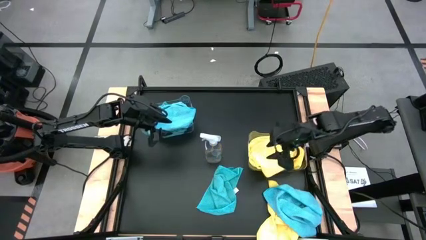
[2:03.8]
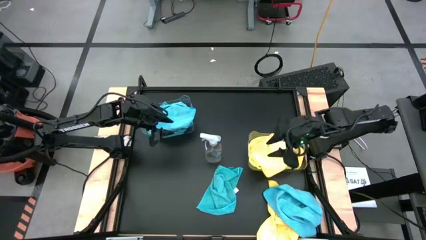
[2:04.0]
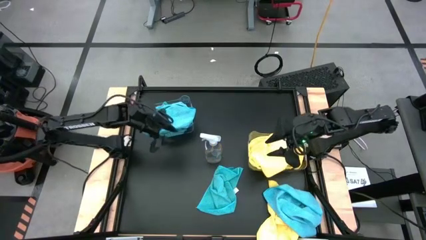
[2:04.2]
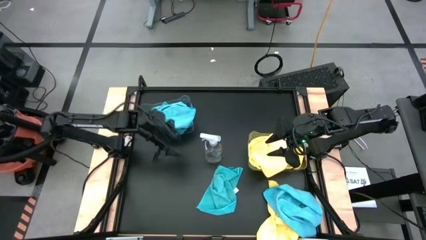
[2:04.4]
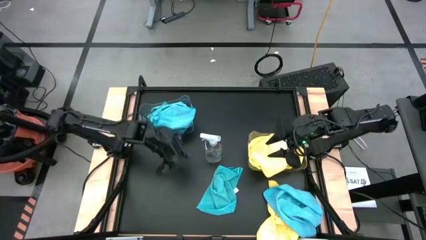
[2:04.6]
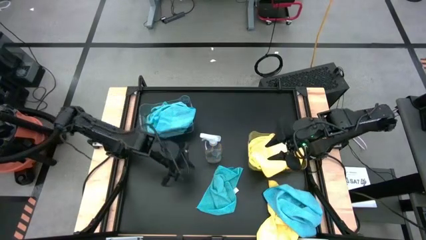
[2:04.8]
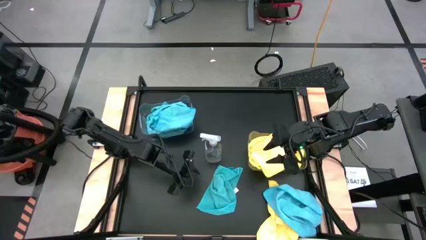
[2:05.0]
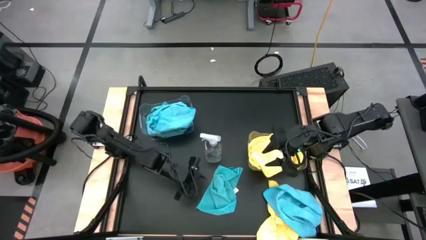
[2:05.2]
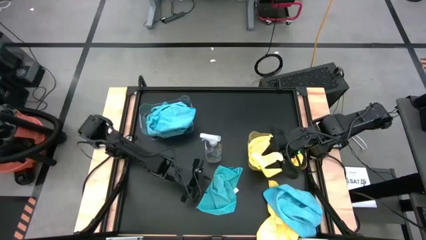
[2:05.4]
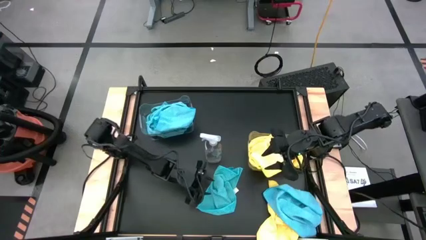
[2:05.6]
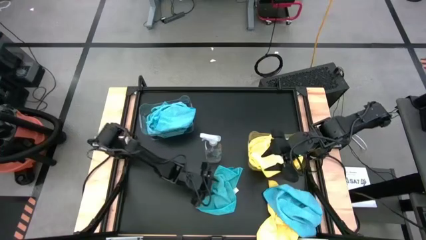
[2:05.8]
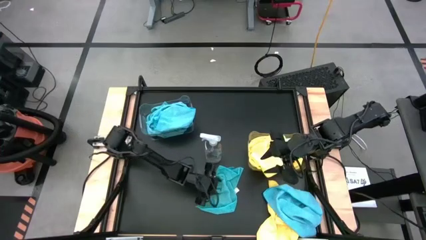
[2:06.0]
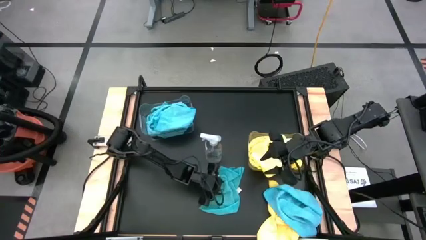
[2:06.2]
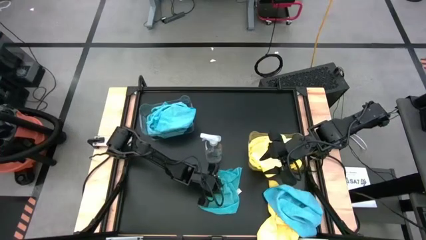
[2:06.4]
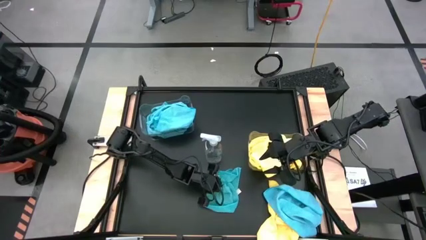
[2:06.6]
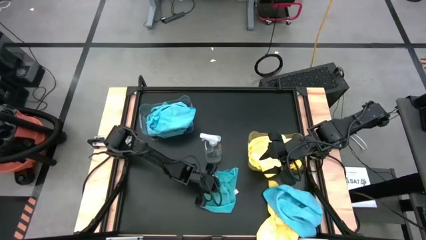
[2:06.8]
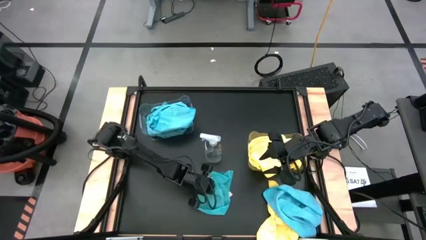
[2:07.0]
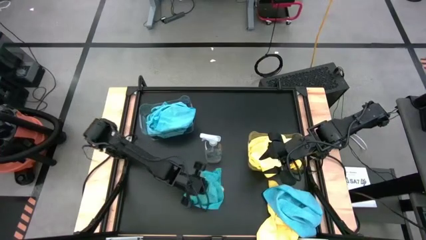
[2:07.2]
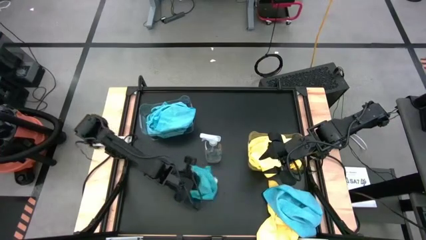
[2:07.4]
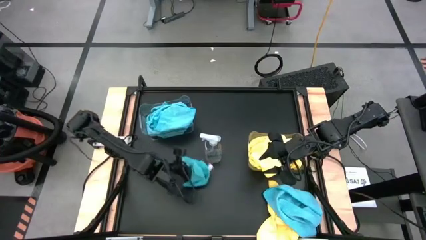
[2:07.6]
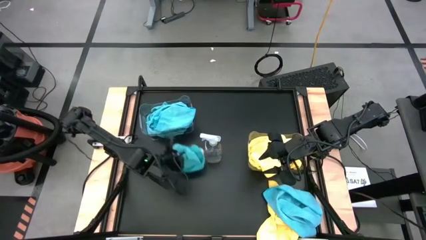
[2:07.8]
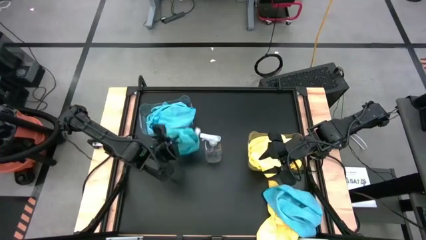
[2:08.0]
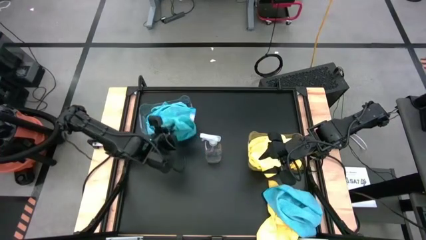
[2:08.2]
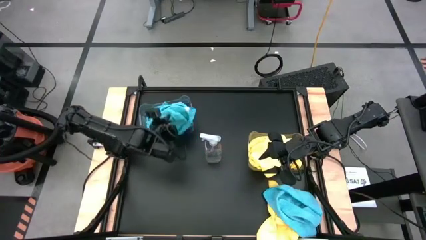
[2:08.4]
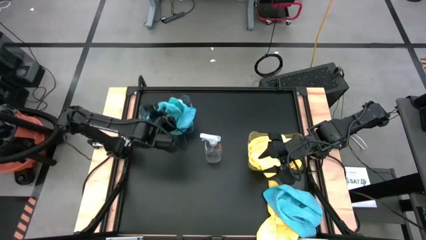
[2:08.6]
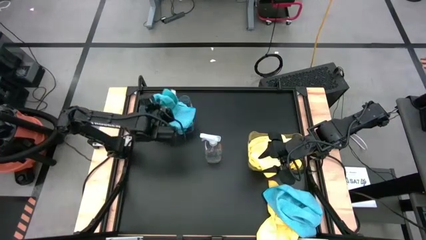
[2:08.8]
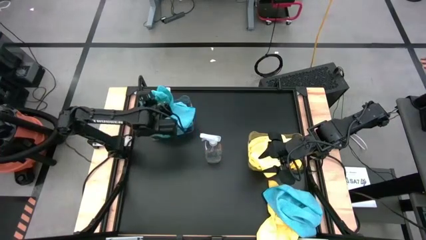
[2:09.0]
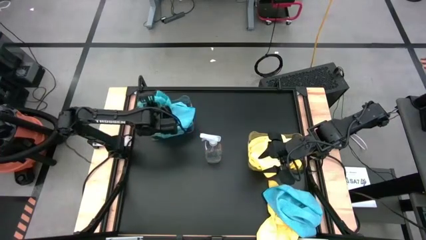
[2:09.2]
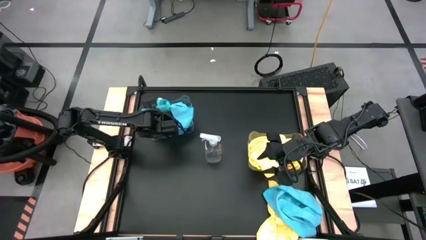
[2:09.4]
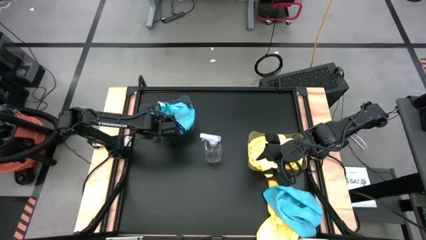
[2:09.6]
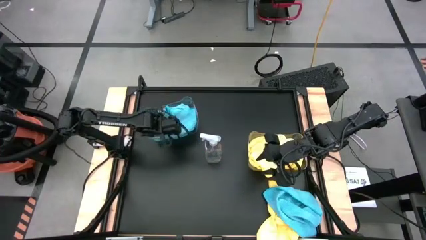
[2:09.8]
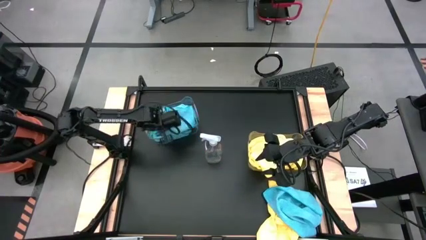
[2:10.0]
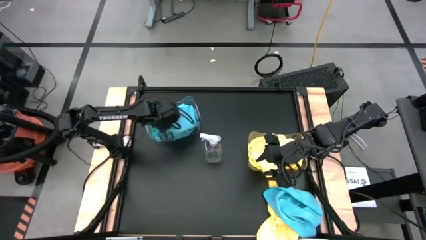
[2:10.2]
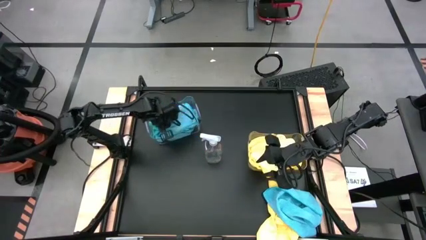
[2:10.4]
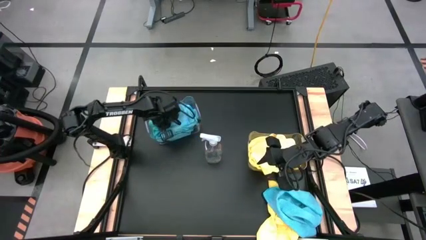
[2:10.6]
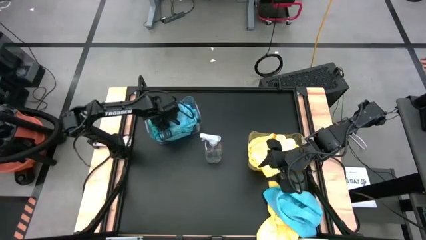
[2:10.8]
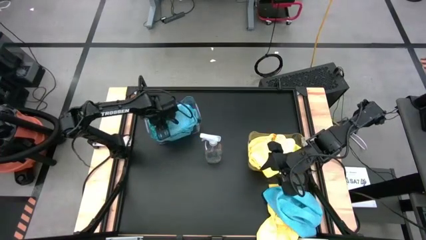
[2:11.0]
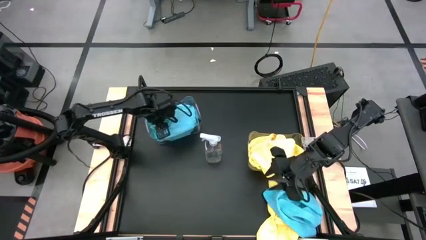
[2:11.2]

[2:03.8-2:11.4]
Task: Sort microfiber towel by color & place in baskets
Put the blue microfiber towel into the top transparent bin

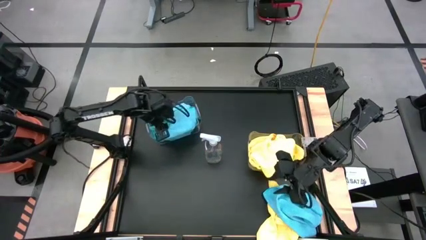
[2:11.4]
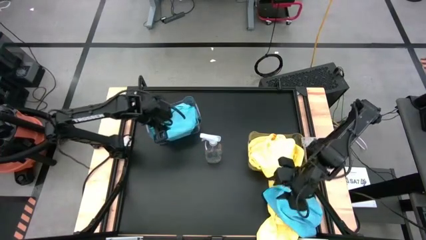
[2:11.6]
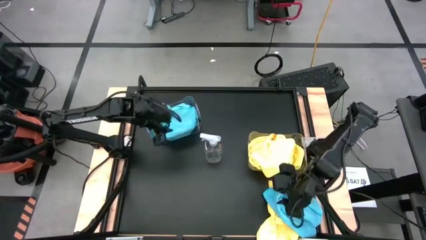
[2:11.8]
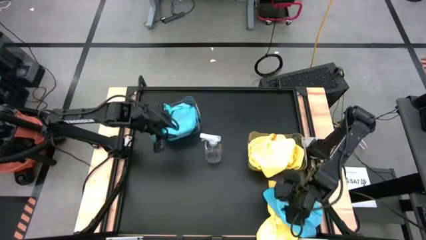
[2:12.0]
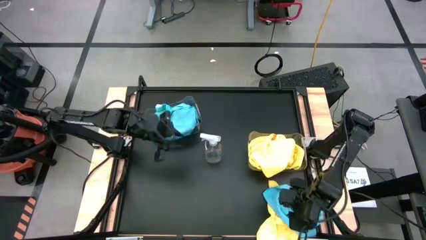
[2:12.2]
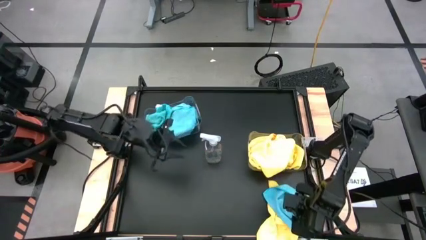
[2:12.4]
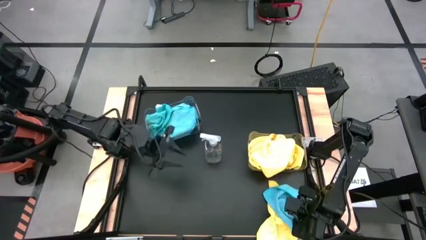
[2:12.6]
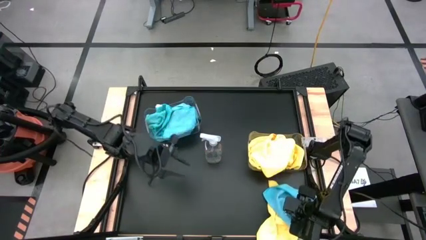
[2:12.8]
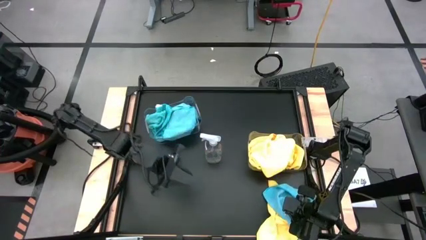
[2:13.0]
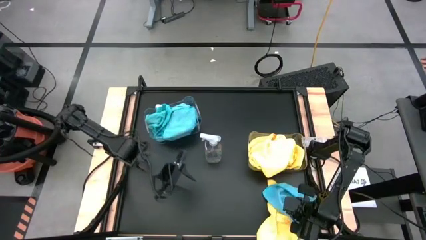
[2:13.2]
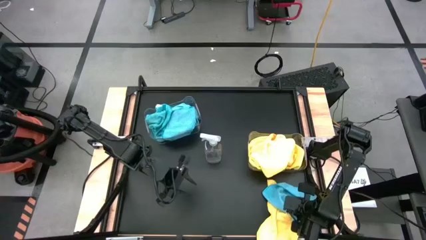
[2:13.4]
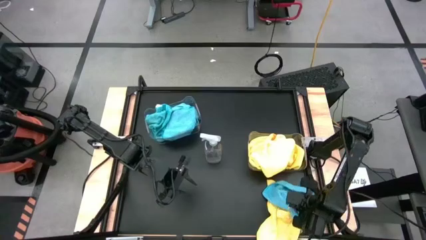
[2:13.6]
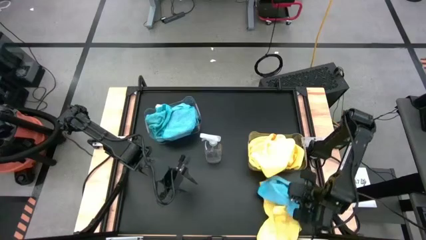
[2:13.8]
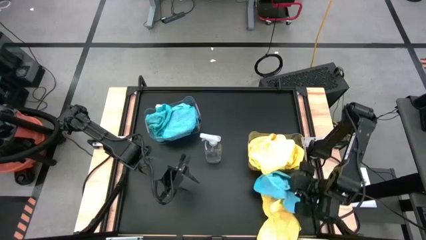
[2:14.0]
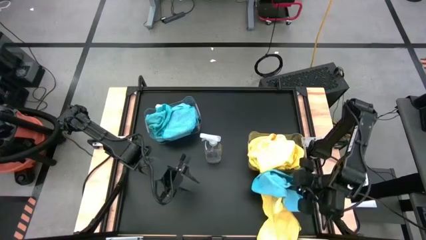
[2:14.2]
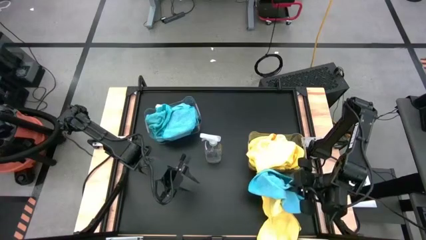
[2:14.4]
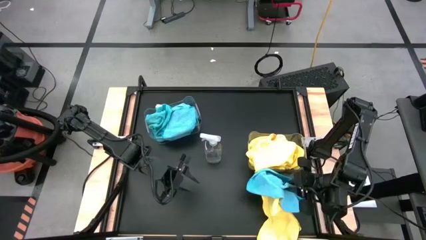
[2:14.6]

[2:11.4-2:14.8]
Put the blue microfiber towel into the top transparent bin

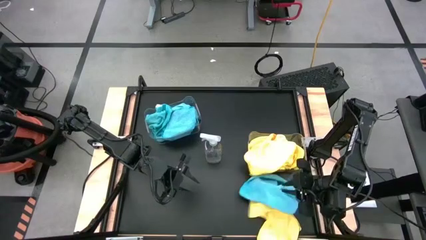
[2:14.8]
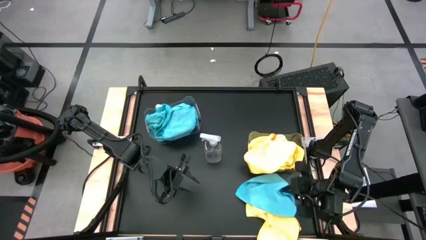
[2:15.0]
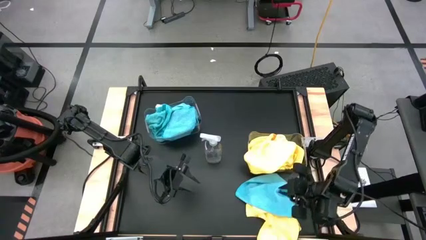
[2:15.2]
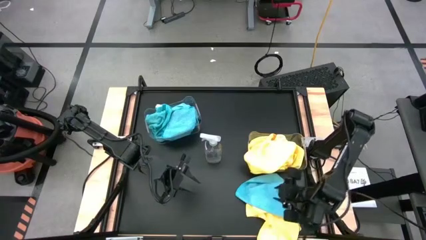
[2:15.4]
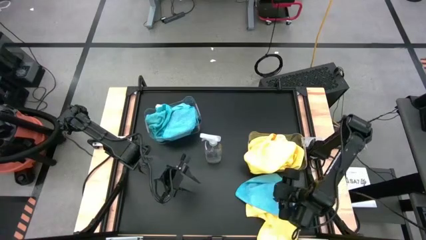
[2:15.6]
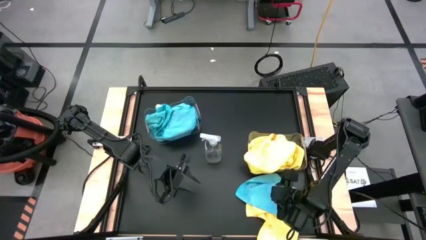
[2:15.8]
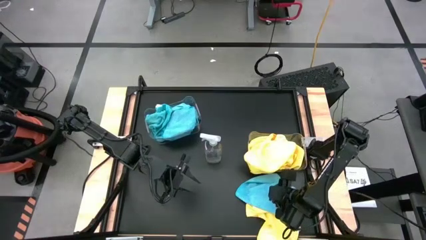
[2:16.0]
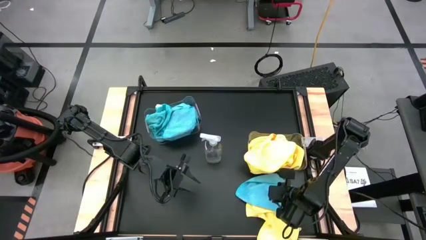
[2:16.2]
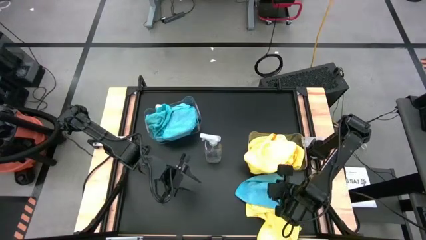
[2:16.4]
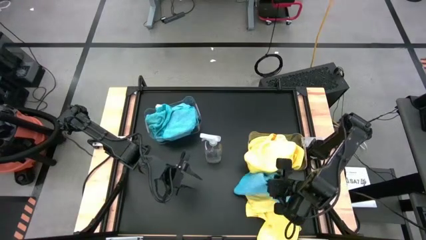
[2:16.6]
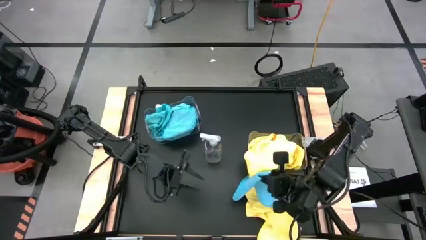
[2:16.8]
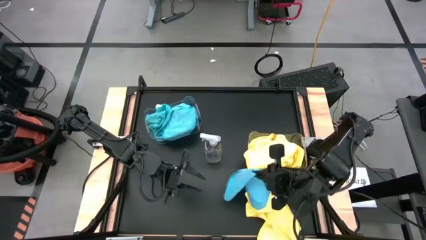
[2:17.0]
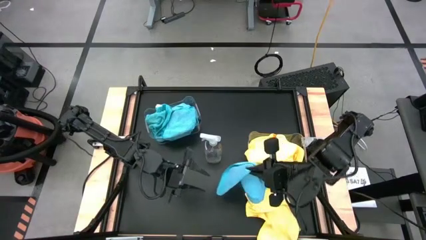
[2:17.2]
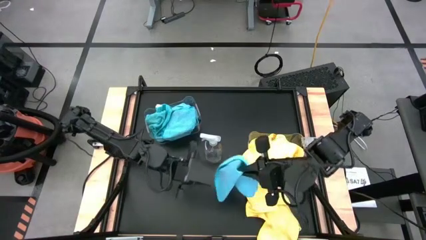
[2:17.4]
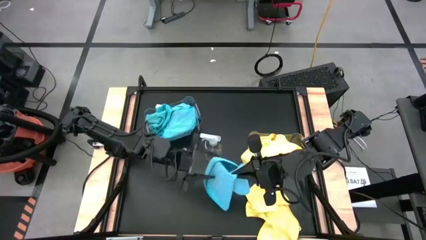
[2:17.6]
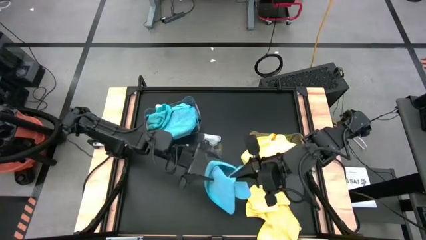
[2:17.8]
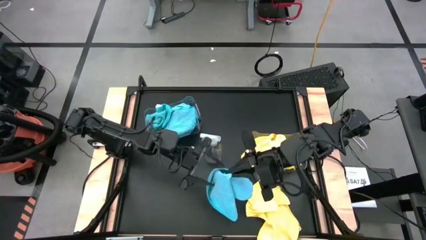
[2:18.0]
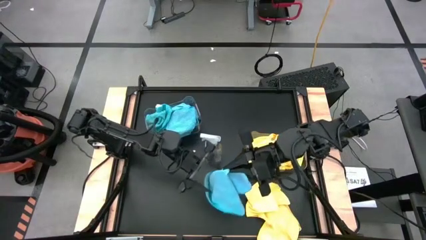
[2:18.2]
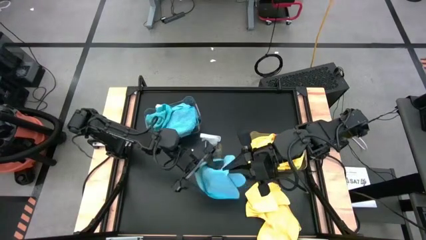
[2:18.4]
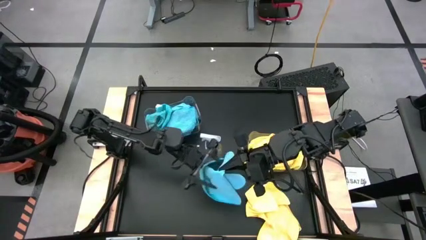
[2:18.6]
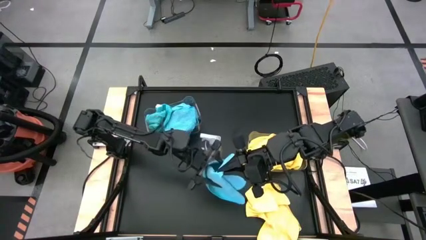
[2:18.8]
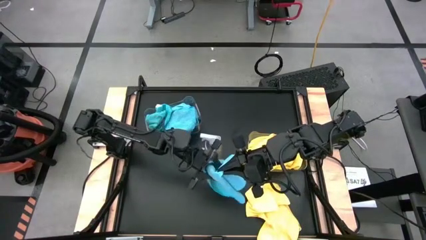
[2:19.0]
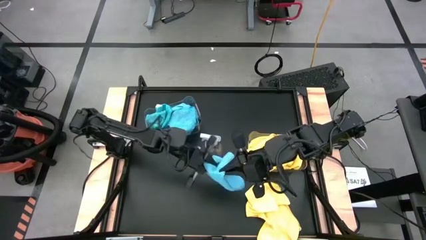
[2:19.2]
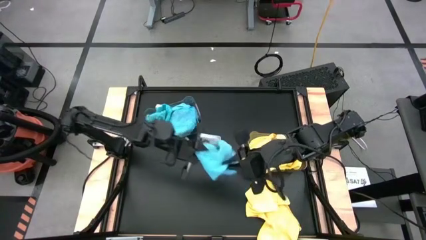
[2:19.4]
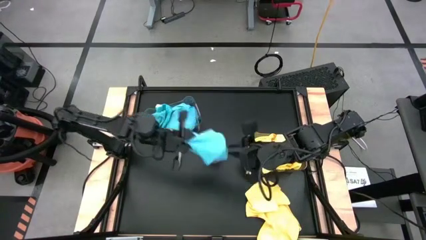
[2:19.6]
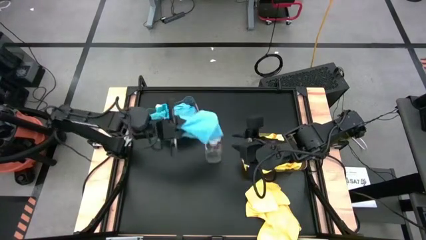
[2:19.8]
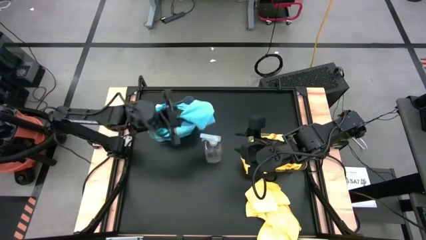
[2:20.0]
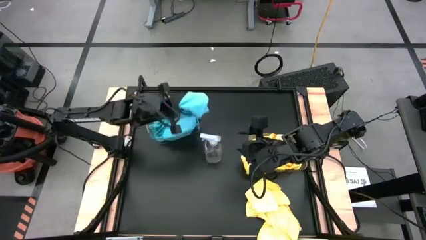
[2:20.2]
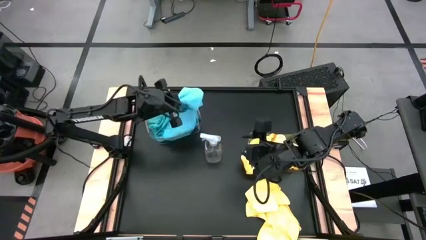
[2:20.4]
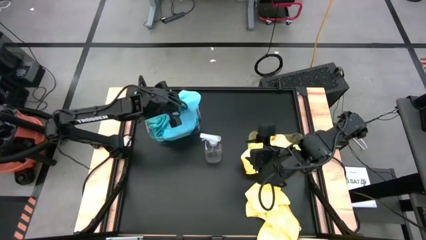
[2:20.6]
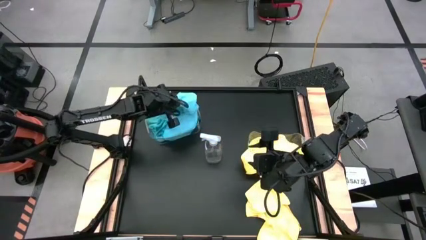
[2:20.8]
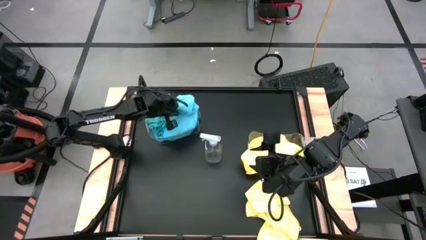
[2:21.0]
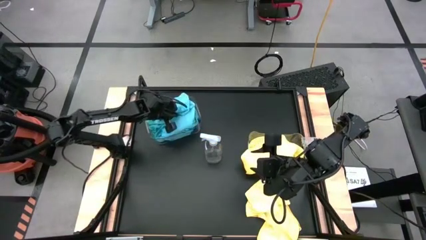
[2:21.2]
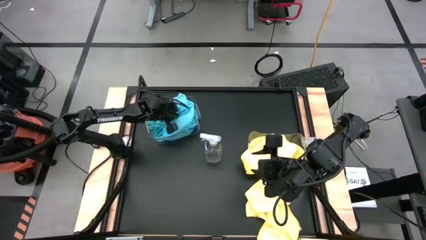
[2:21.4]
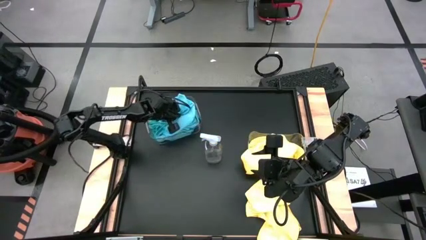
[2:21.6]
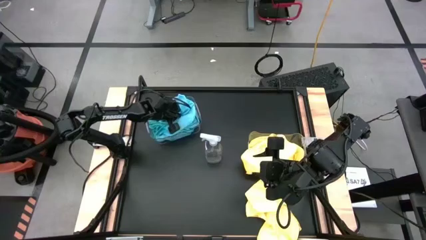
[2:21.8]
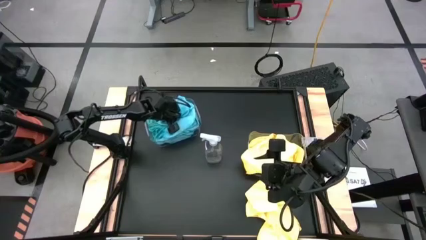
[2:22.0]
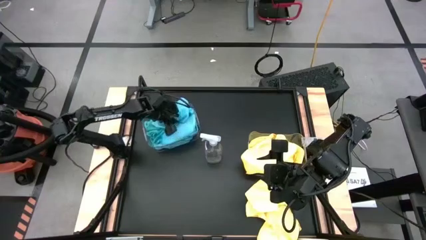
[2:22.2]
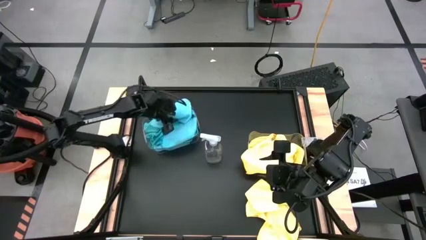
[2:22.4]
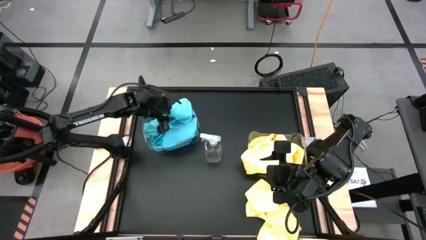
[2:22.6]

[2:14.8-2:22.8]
Put the blue microfiber towel into the top transparent bin
